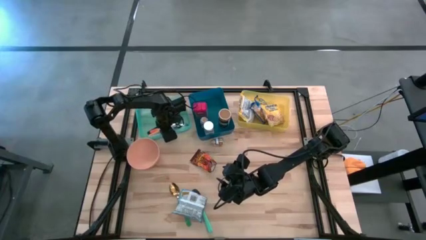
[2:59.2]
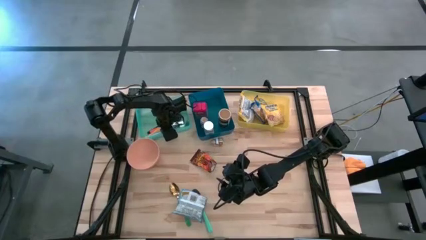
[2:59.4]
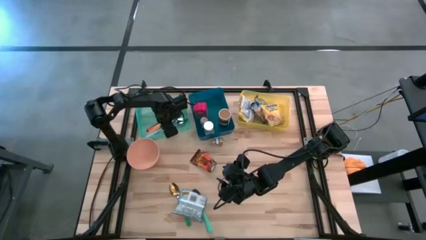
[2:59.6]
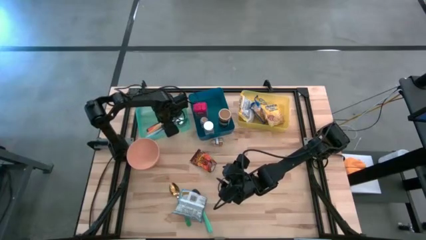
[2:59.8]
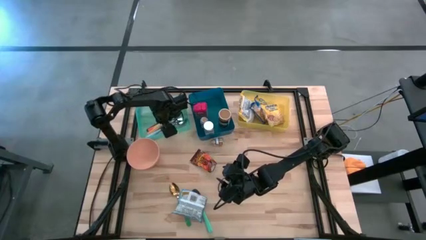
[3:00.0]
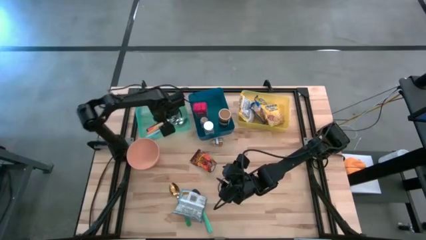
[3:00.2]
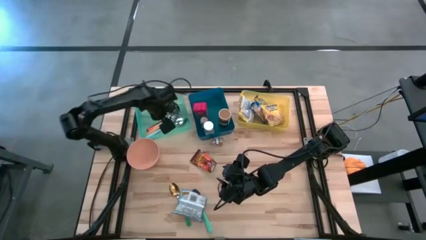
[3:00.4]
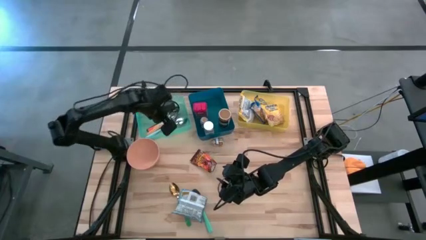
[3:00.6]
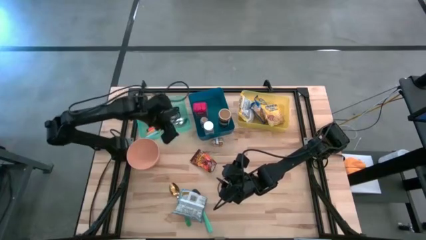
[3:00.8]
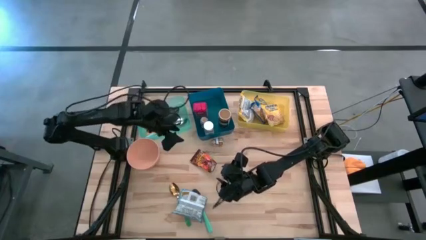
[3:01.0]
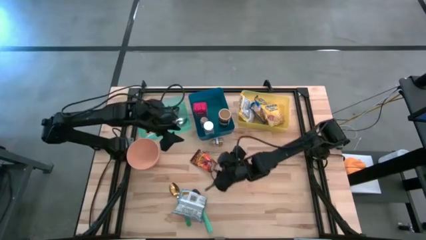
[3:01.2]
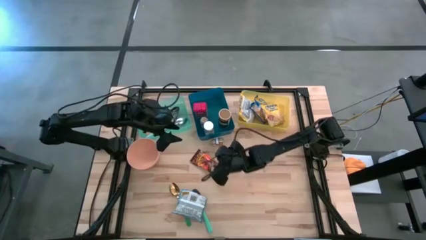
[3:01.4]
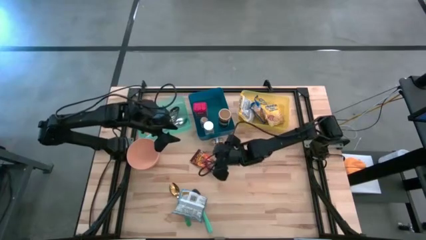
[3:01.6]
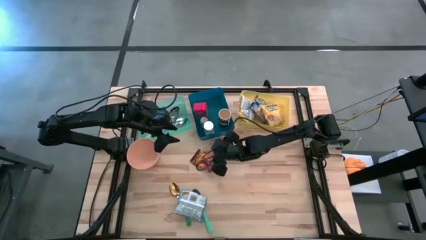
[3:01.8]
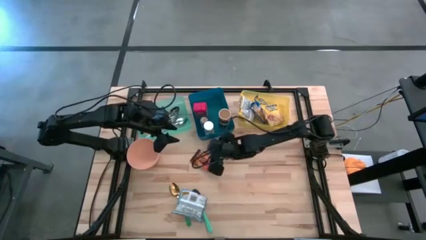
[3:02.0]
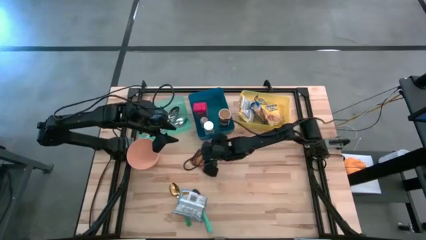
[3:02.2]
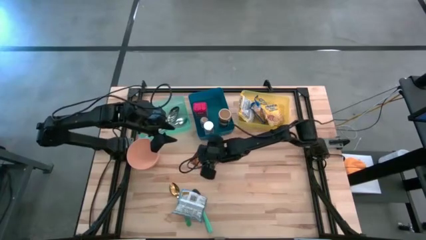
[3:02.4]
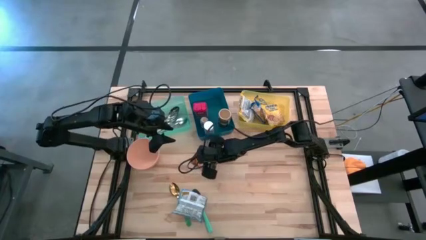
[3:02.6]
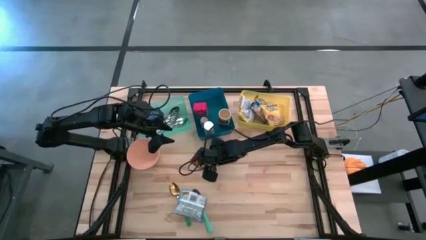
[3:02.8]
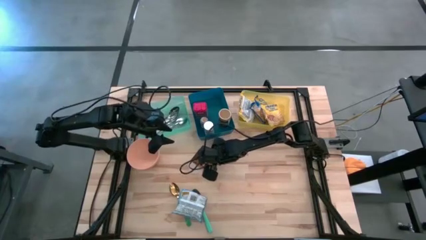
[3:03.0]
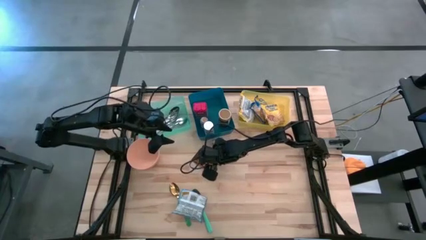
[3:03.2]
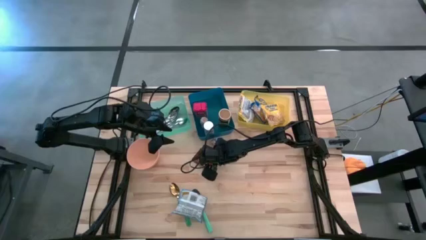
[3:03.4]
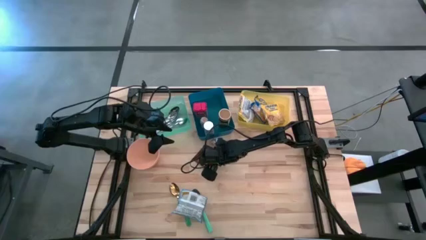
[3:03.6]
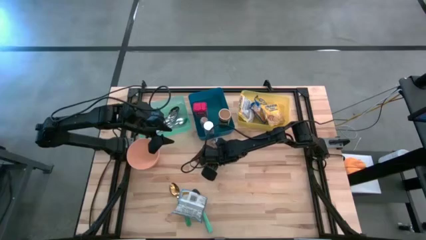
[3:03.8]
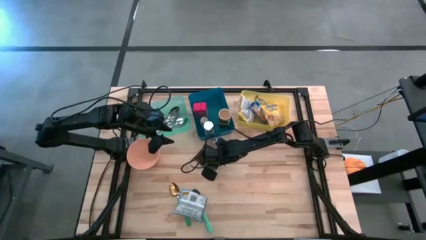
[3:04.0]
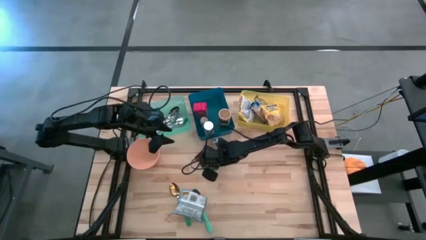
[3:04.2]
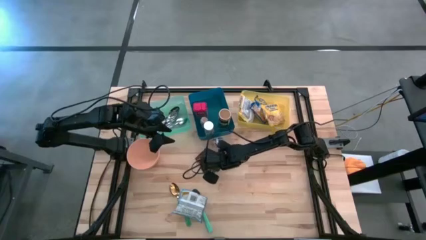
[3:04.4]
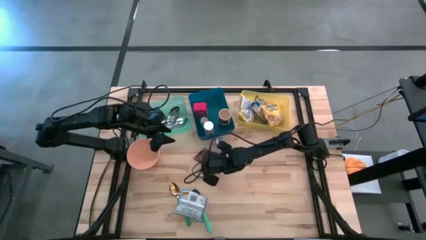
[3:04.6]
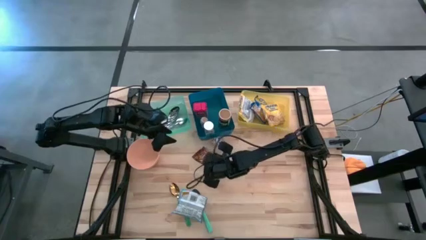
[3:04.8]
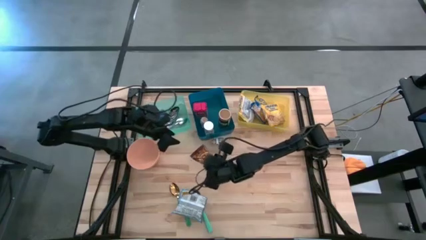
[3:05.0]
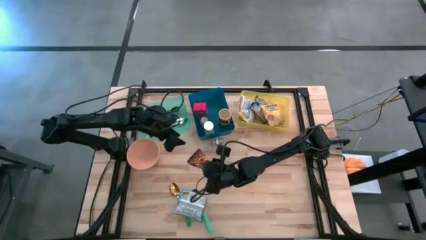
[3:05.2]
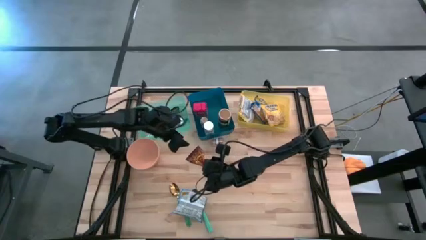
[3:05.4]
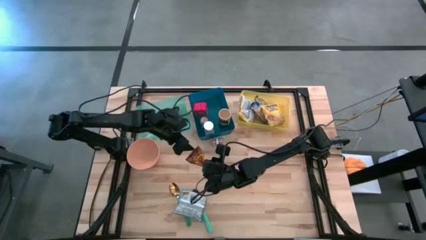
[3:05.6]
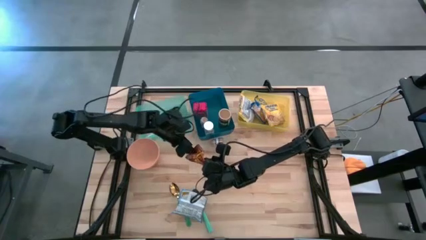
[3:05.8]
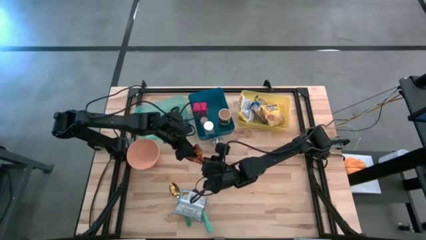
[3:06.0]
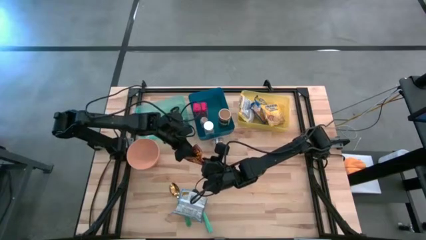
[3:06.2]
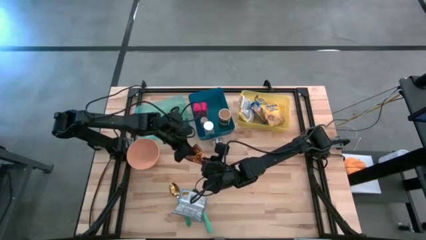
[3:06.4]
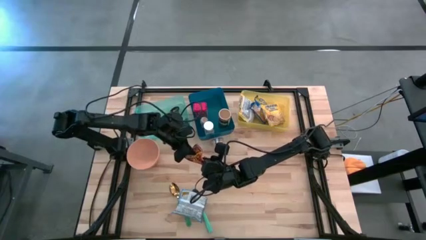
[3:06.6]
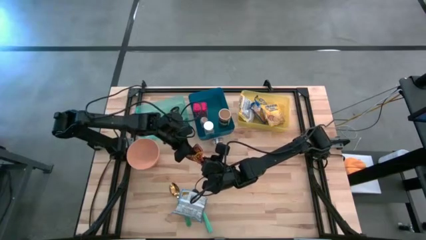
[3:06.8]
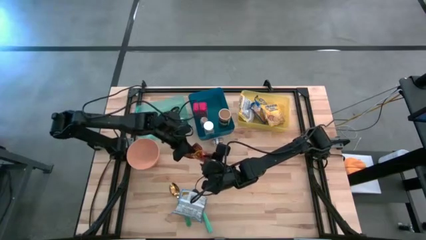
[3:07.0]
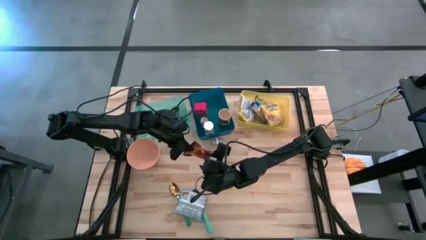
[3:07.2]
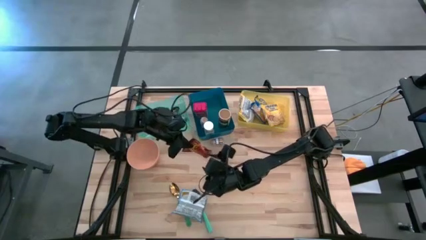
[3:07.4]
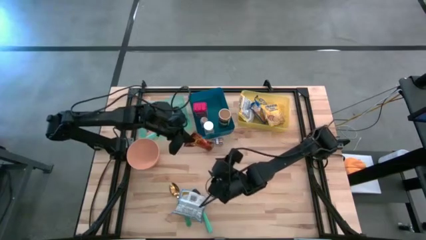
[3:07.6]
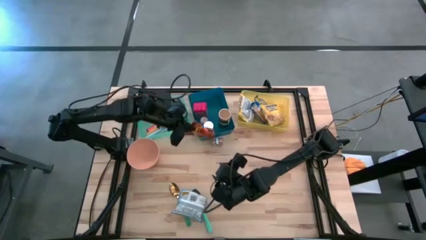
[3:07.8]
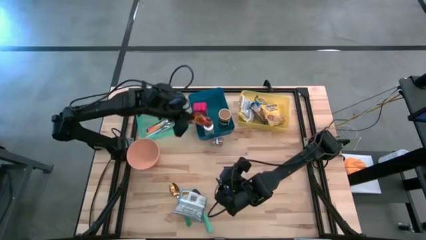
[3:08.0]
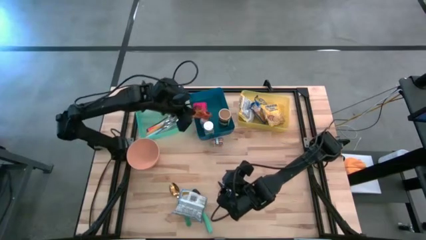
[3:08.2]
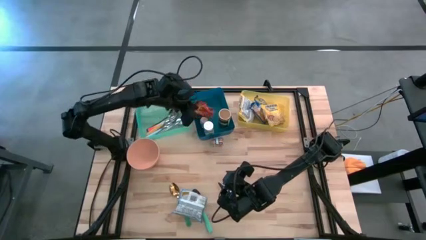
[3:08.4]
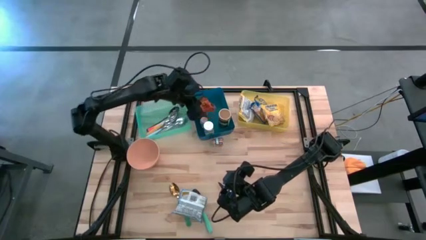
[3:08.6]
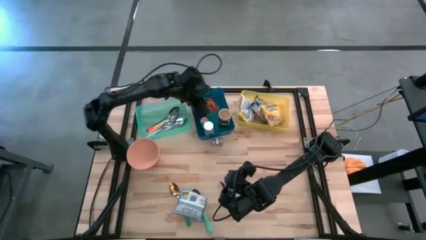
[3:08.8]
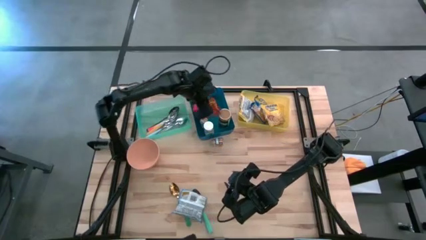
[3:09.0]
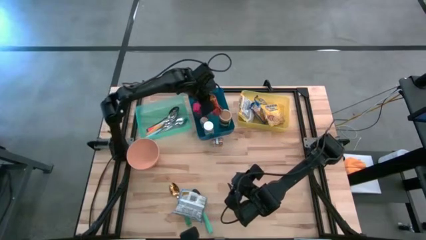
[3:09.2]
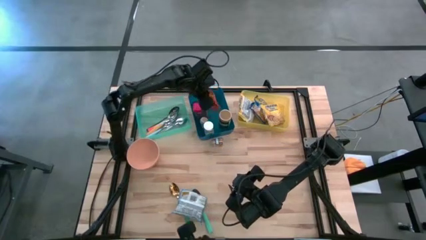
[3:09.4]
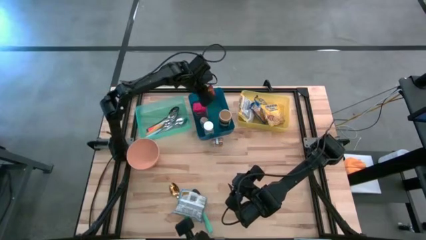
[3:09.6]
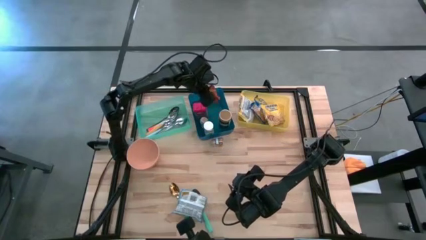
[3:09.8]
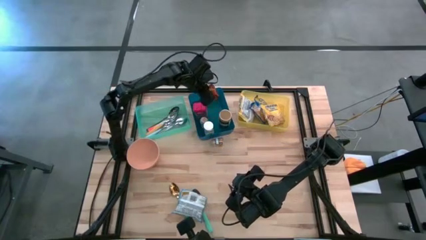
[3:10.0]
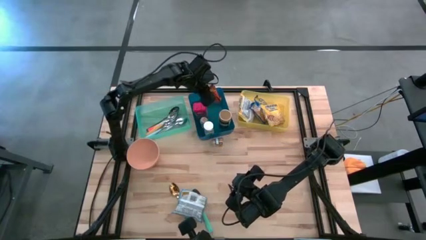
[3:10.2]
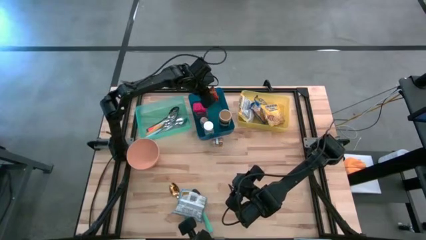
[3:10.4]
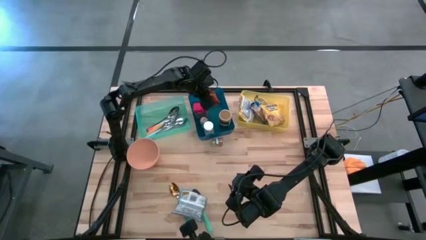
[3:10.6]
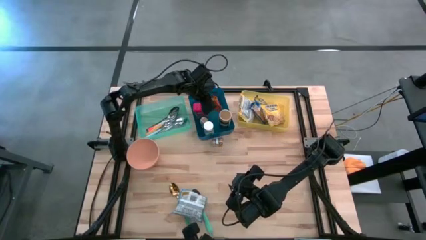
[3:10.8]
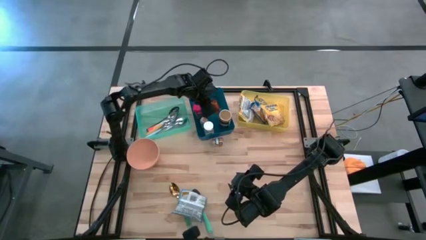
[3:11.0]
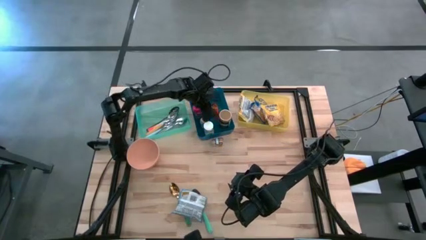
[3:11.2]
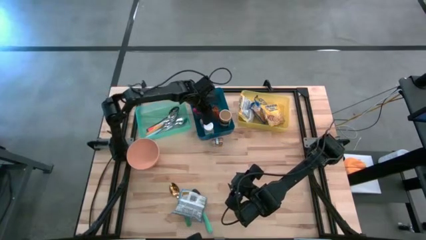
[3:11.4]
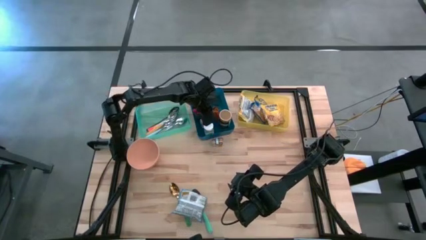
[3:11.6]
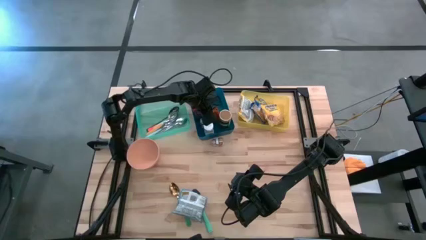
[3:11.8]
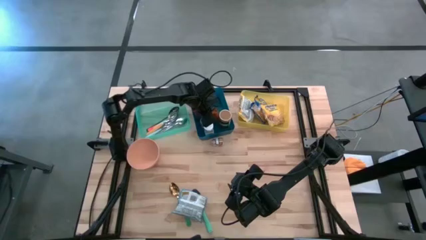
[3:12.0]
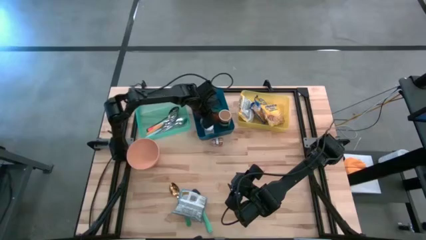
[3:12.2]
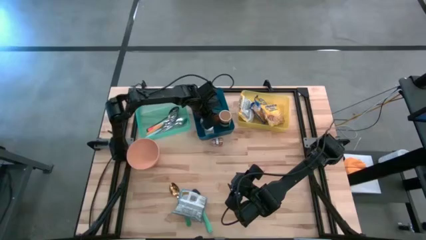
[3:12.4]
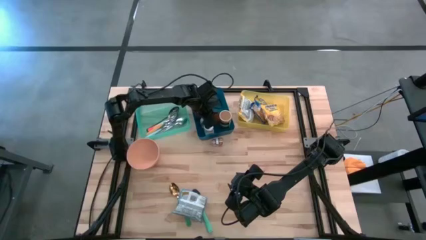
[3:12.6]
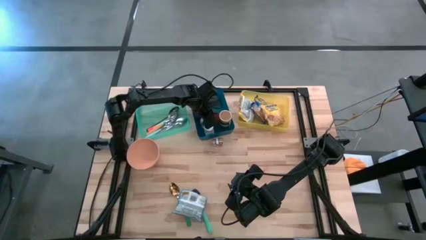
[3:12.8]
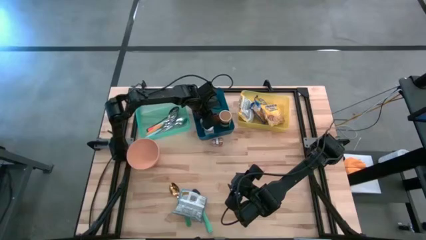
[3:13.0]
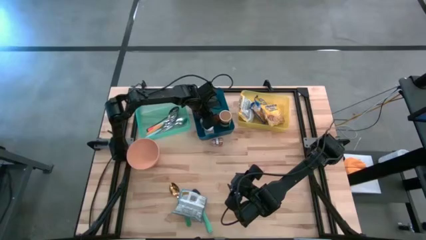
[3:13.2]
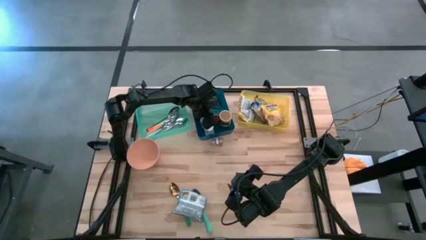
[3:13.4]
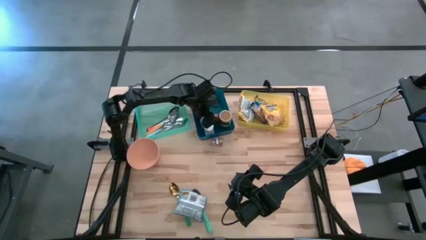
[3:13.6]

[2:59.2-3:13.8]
Put the orange seasoning bag into the blue bin
